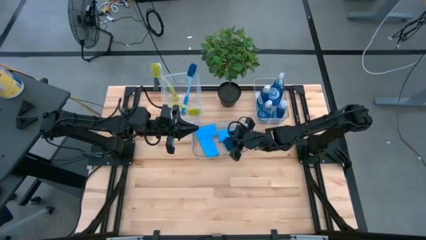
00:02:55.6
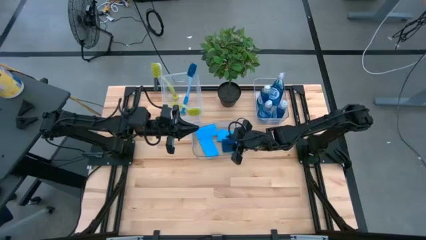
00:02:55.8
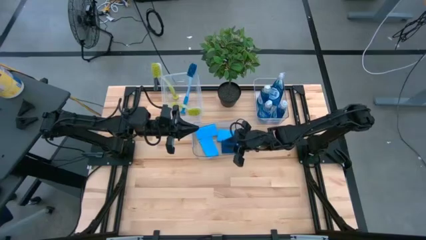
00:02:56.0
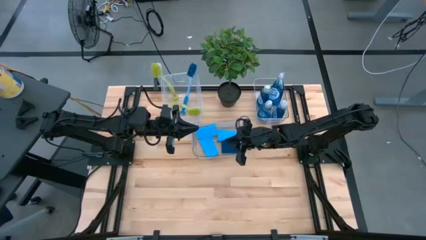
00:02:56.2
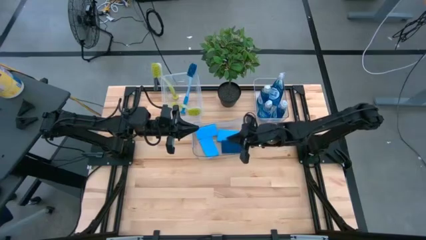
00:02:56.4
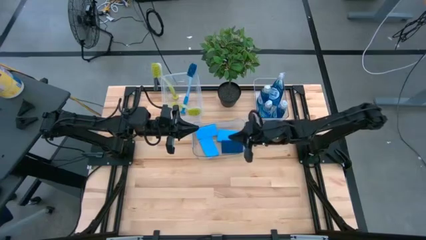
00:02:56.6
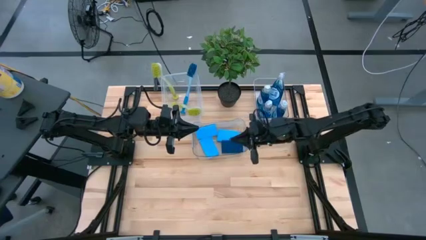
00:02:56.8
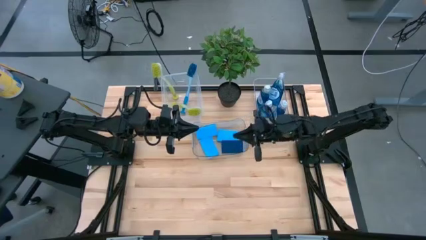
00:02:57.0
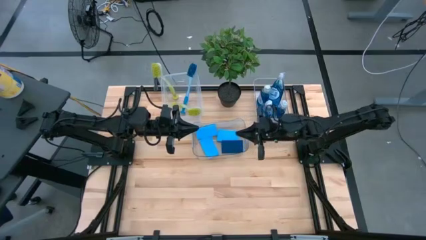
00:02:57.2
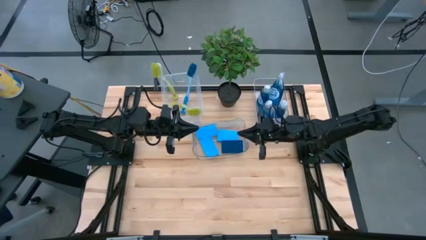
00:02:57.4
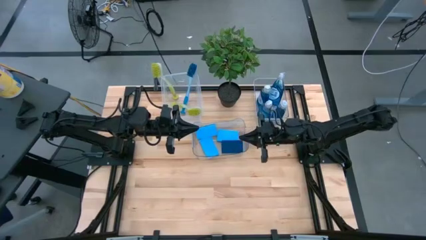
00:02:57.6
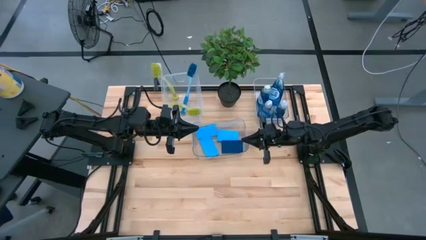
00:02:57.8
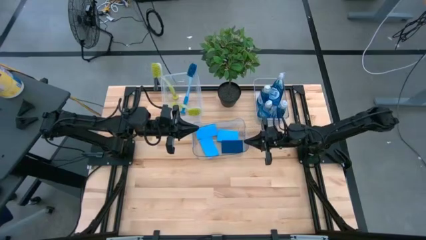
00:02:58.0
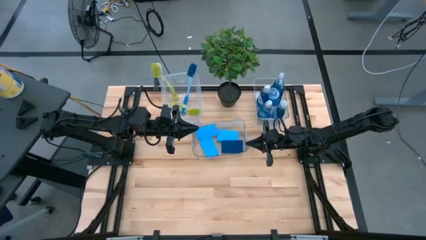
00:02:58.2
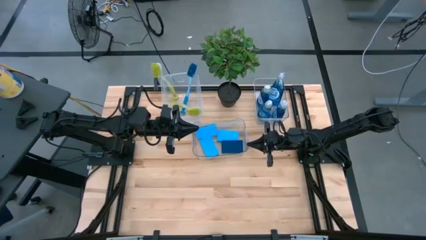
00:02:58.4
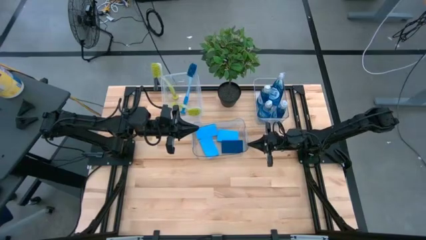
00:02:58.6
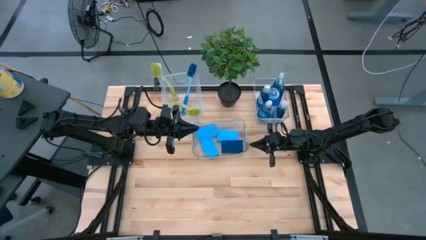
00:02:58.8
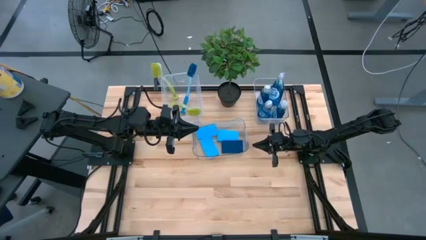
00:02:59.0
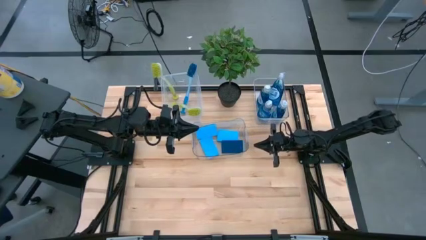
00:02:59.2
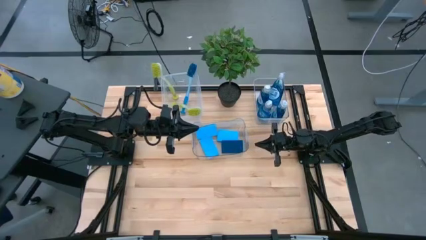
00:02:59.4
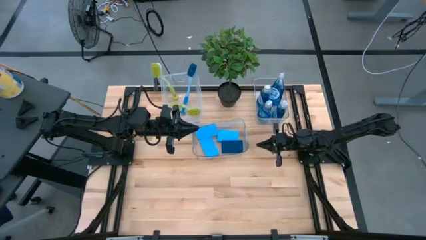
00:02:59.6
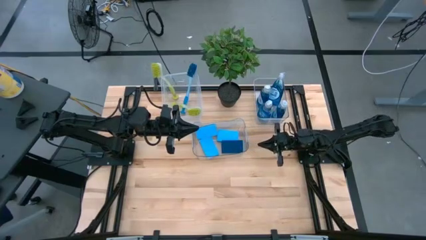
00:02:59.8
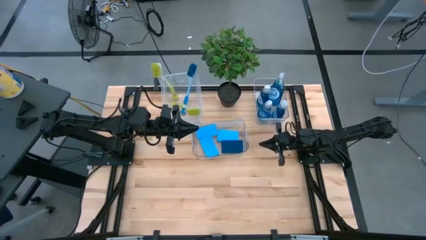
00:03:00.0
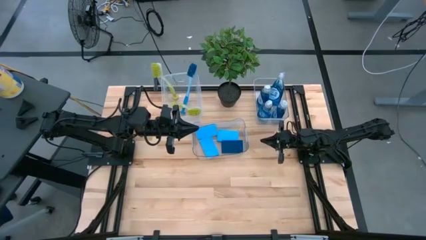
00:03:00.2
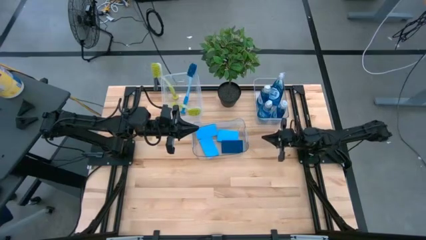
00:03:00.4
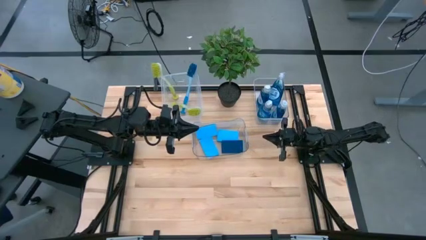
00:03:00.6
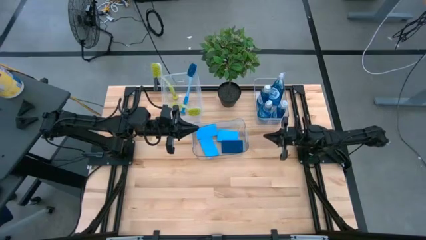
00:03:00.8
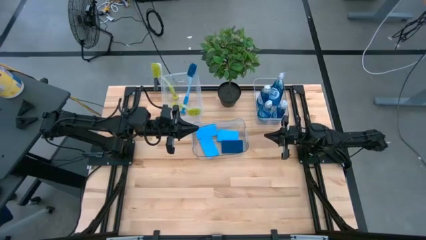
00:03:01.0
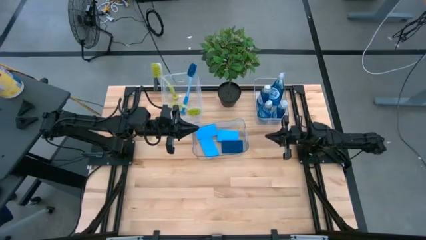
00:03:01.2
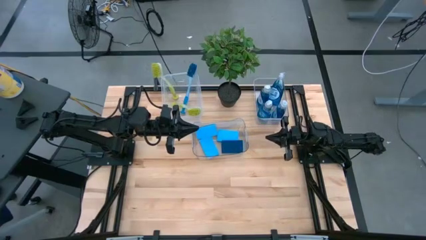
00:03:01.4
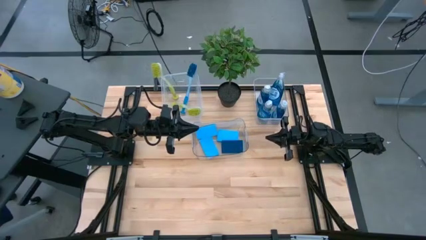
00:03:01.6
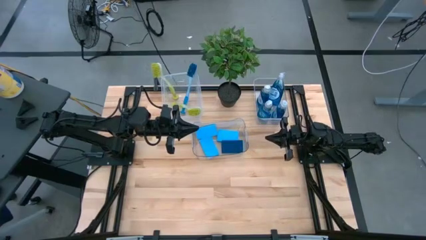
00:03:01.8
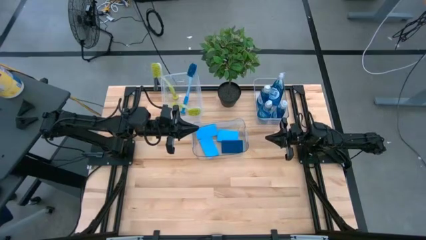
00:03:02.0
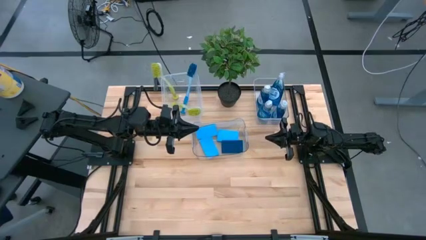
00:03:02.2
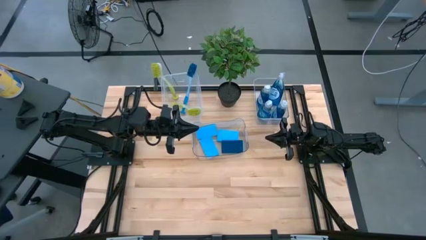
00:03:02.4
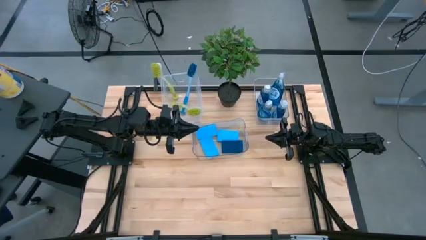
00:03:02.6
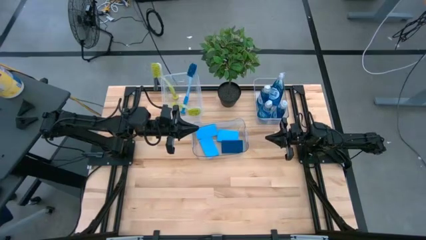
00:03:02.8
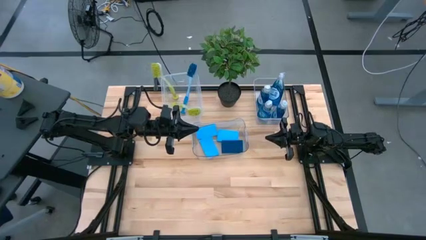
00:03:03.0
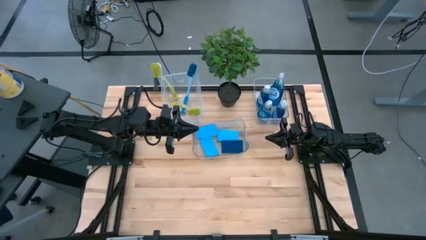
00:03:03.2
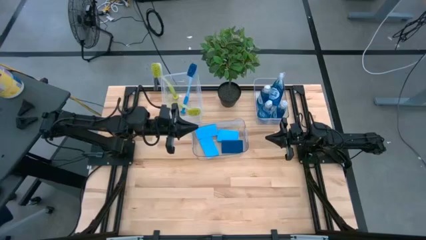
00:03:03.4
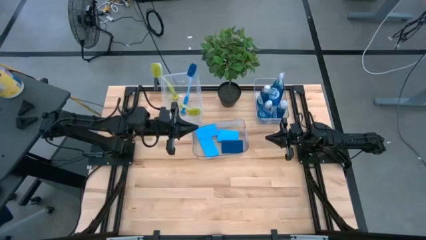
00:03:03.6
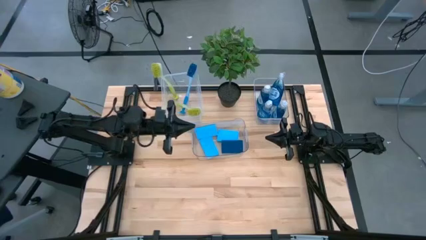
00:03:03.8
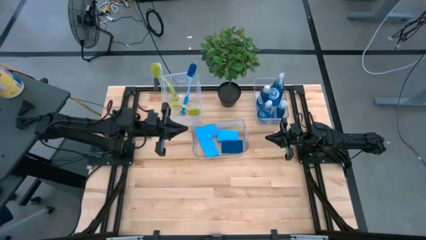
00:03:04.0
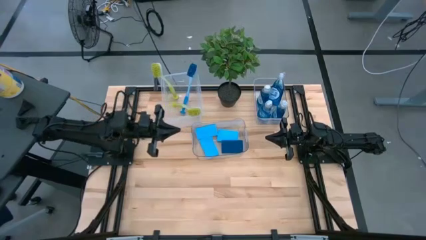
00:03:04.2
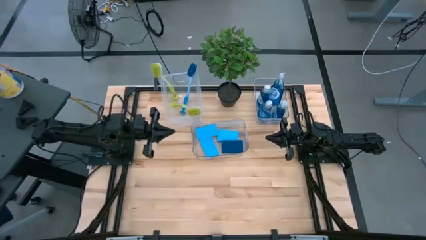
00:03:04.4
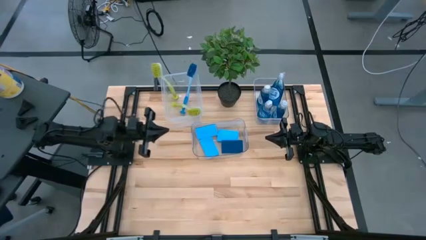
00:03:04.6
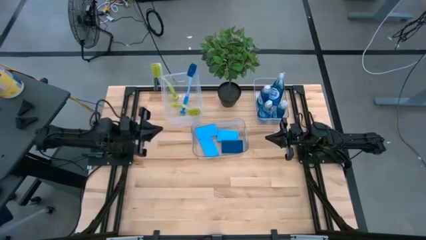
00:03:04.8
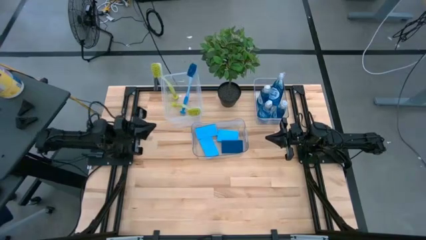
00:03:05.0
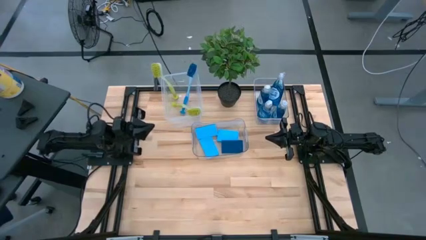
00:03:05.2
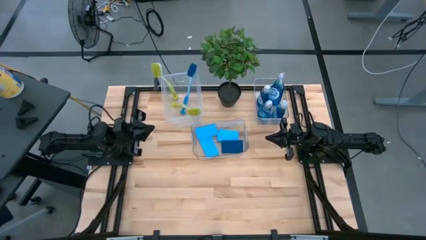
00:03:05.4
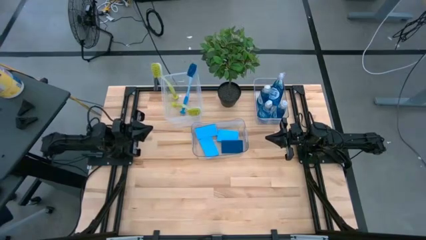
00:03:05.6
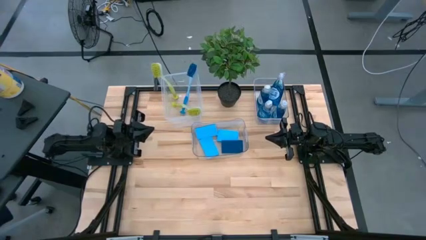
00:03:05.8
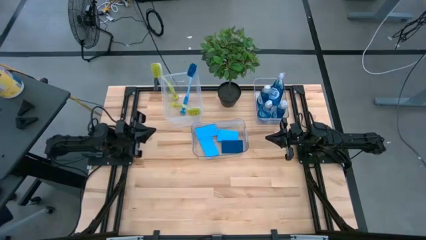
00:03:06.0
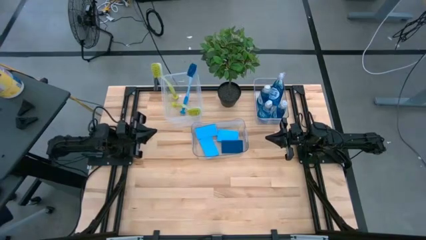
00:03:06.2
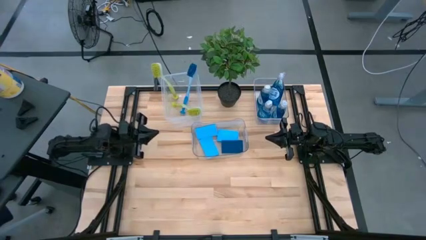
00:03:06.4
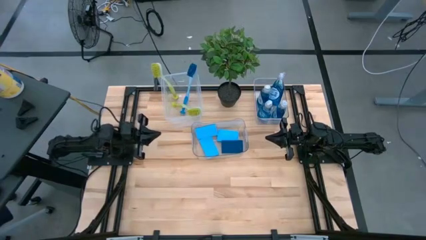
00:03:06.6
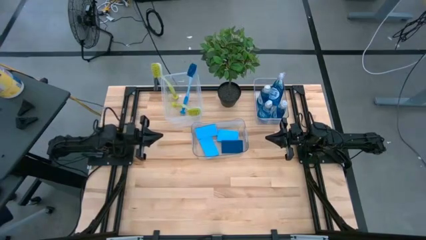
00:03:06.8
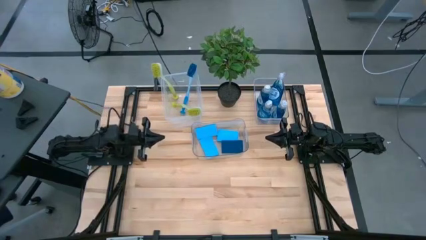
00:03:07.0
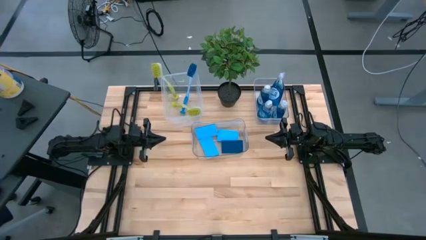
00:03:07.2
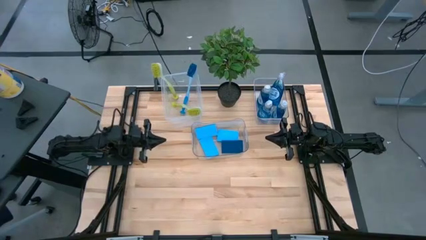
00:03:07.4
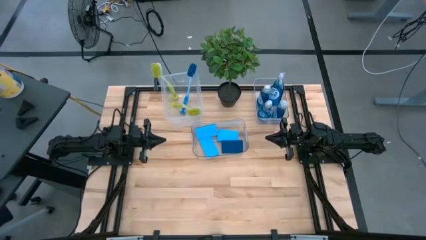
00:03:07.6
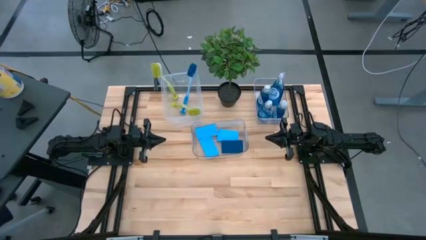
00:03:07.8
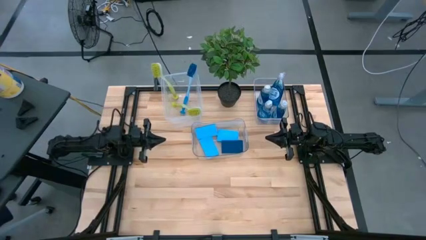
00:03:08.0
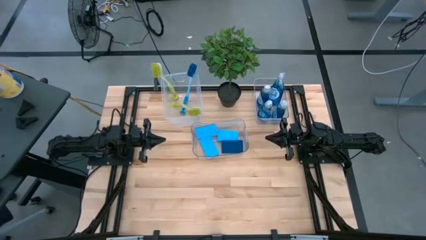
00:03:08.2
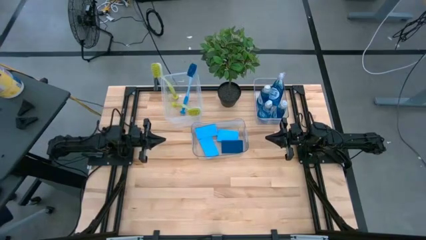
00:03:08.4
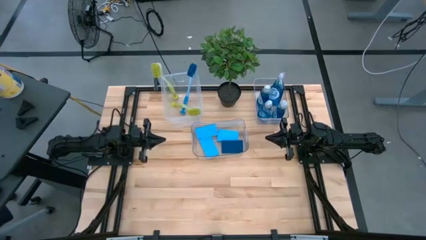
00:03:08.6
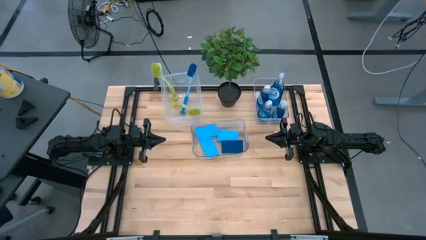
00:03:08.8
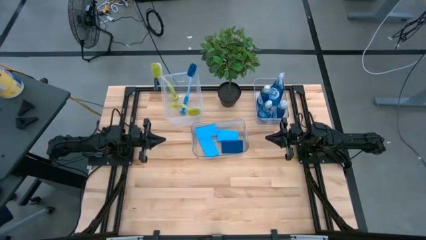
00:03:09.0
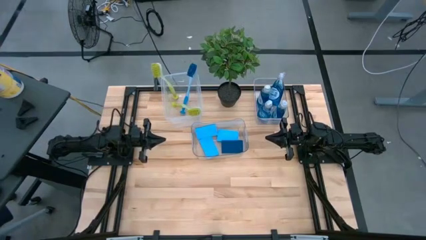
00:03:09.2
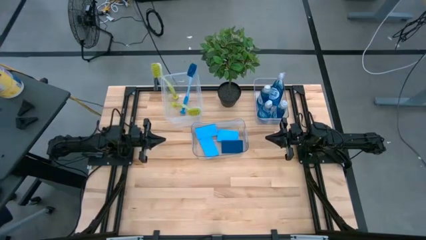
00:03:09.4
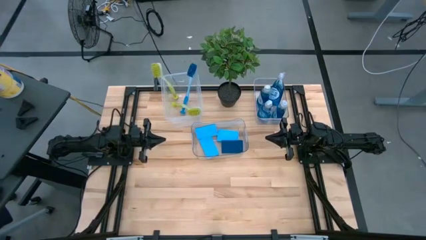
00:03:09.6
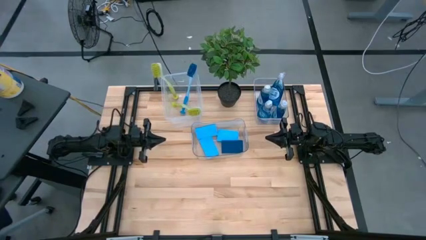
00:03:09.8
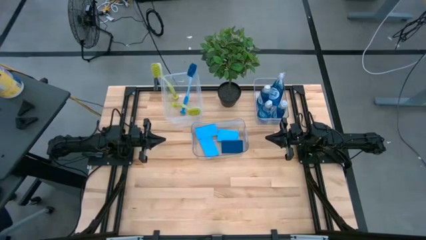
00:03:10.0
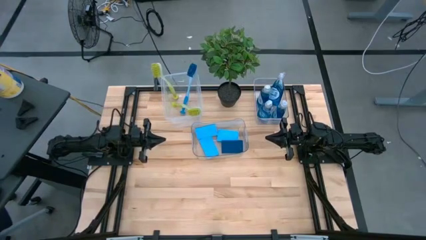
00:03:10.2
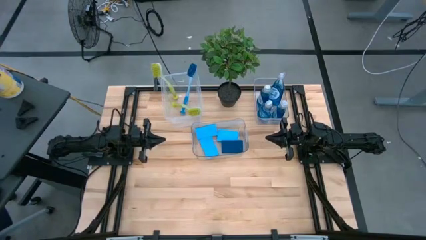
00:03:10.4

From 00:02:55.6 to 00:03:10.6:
Task: Pick & Place Kitchen Sink Supplies
Return to Home Position

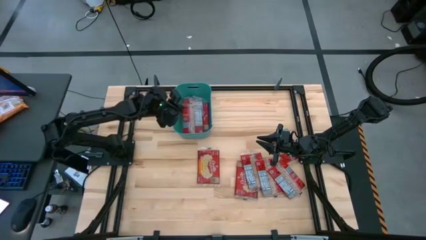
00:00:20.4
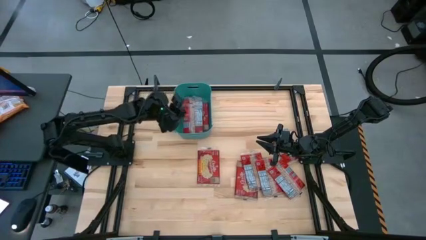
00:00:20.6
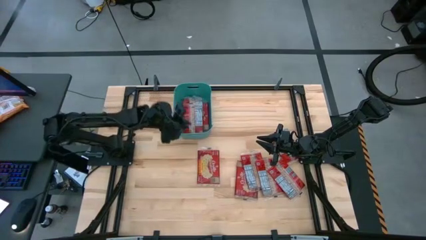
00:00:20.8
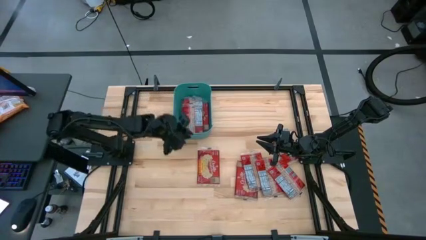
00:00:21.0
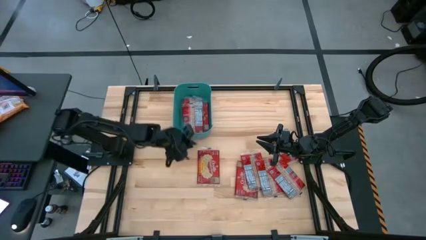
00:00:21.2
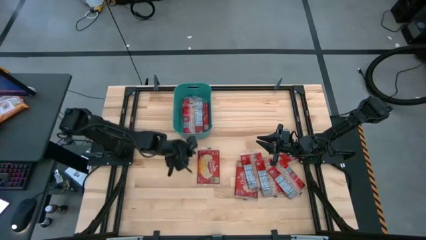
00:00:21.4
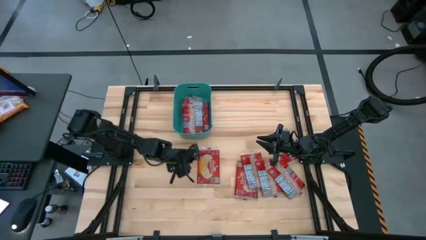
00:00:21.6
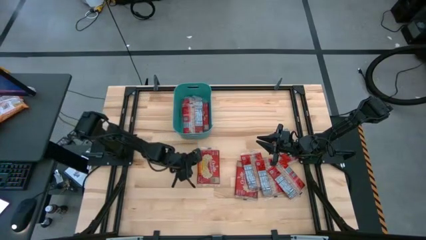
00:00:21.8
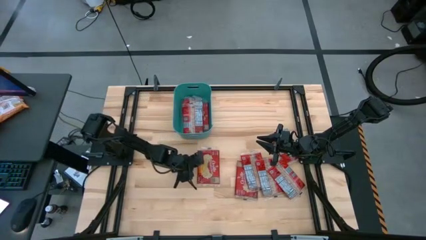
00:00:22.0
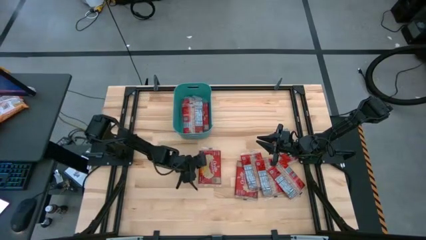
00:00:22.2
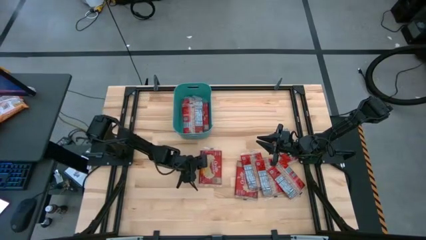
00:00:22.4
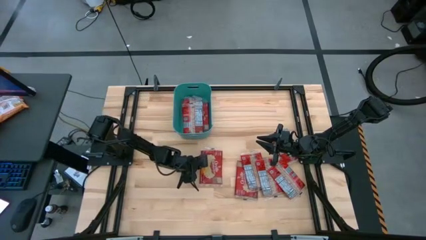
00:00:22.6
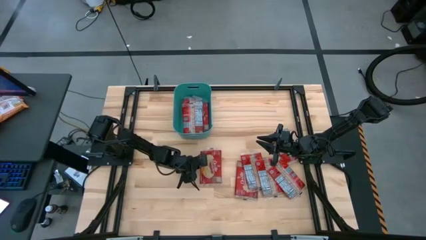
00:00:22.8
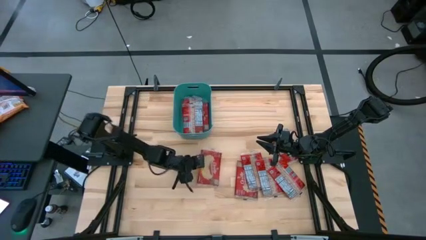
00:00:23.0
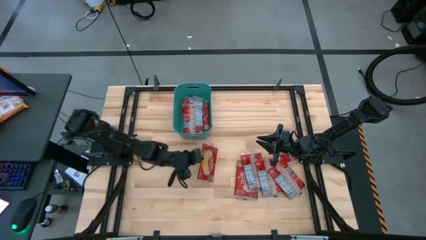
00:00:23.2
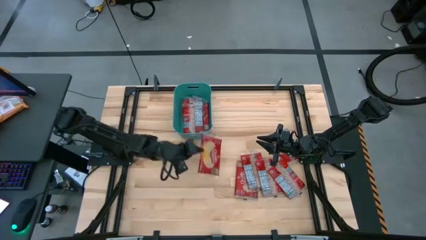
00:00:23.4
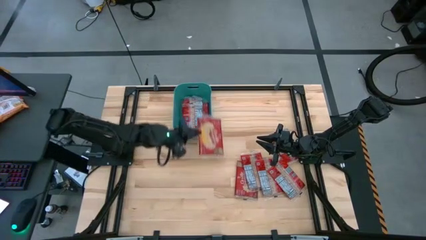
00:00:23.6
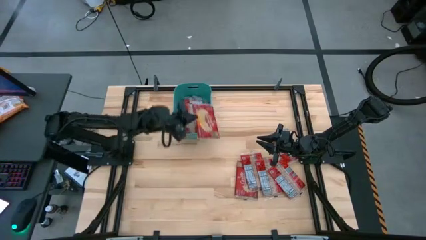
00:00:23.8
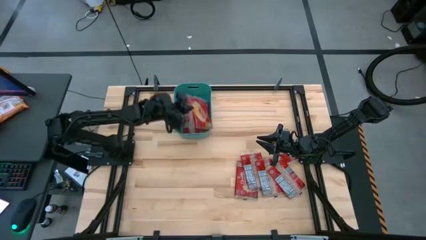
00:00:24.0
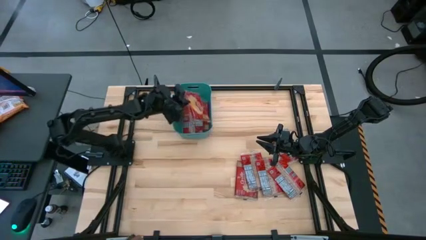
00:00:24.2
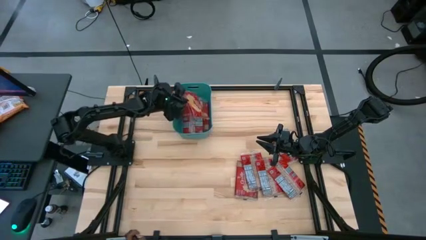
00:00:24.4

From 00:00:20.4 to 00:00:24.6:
Task: Sort popcorn bags into baskets
Put the red popcorn bag into the green bin
